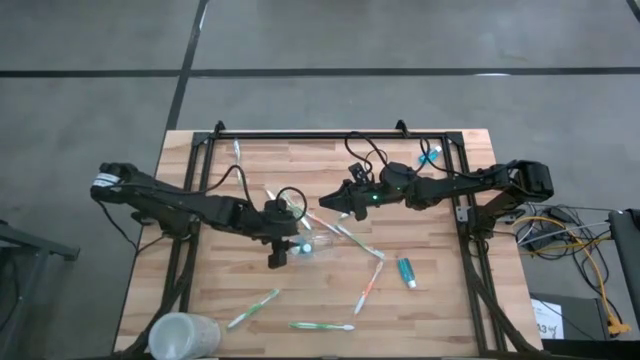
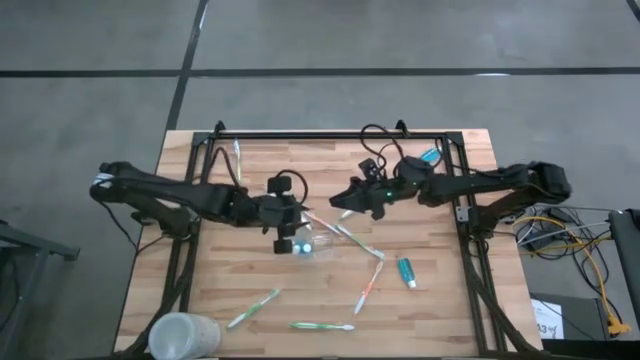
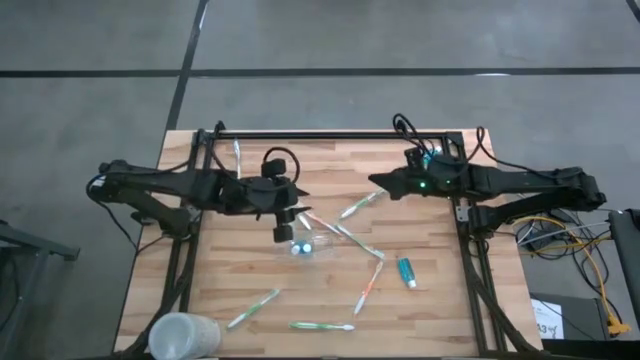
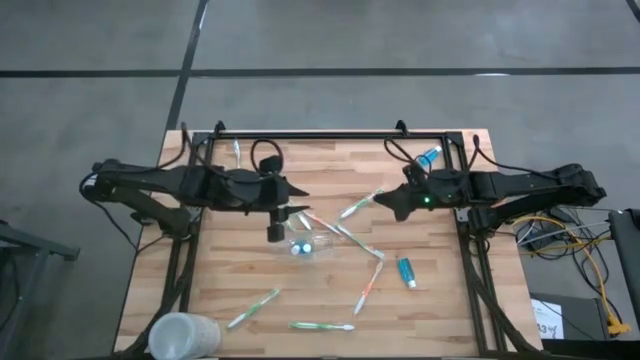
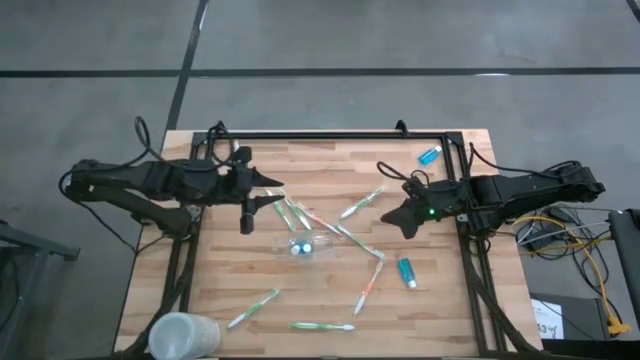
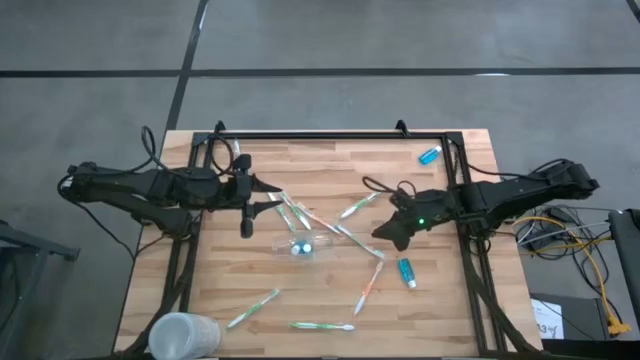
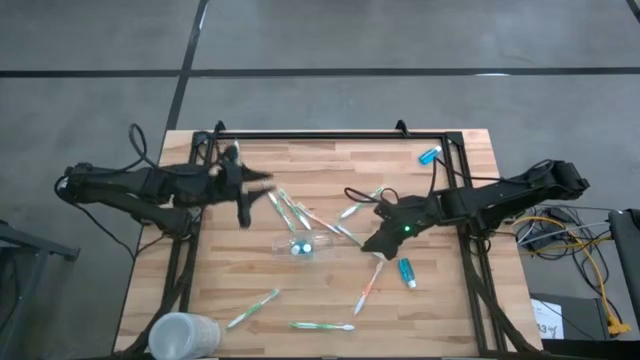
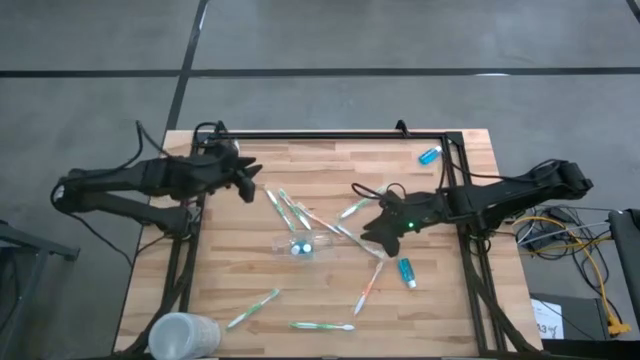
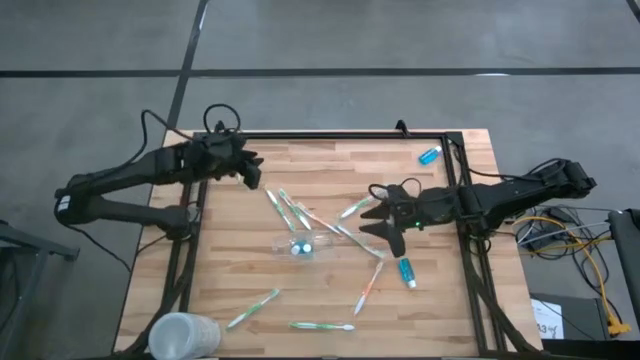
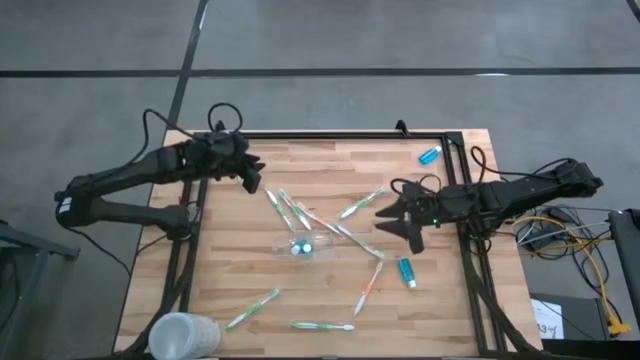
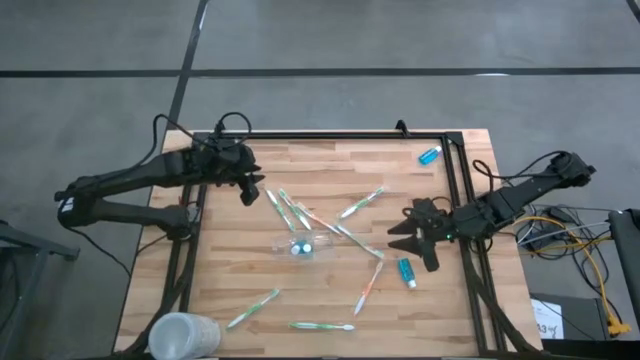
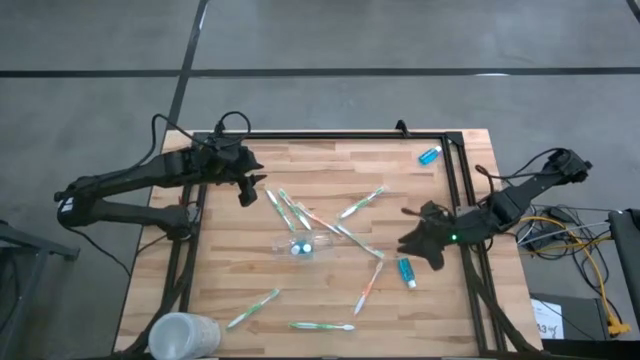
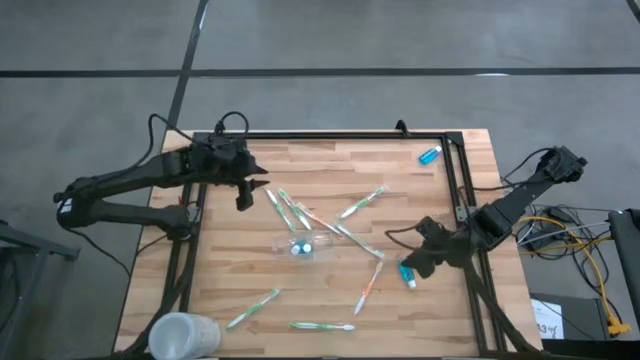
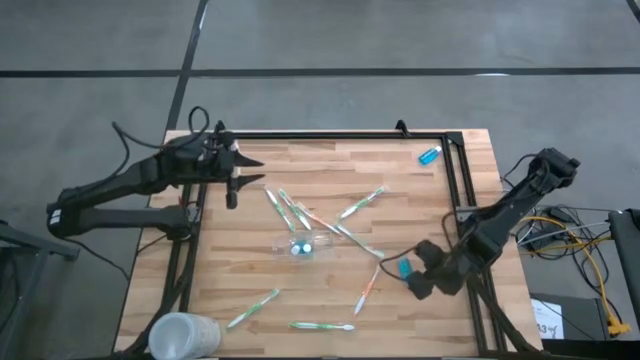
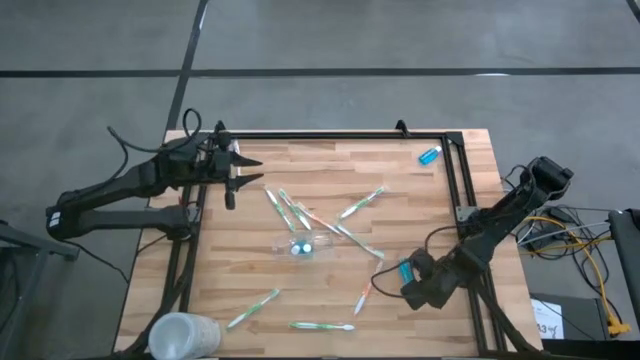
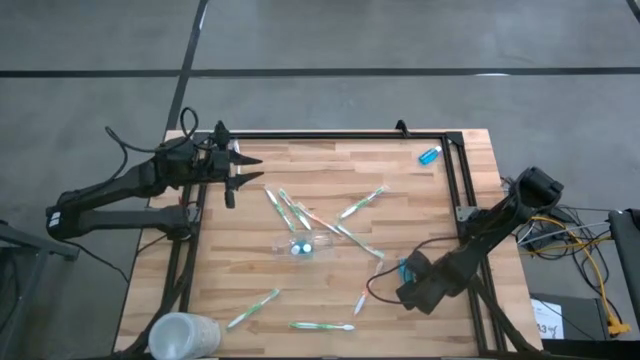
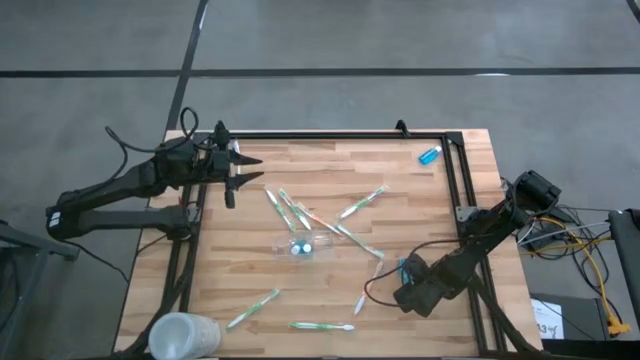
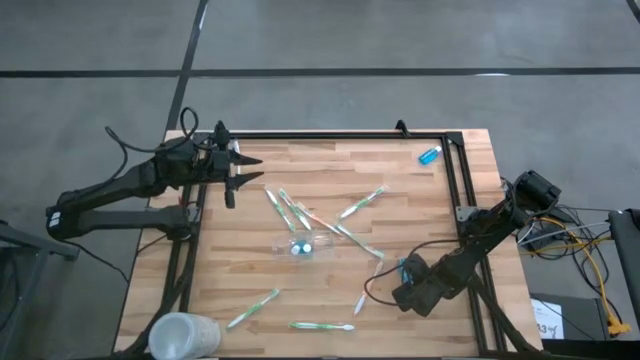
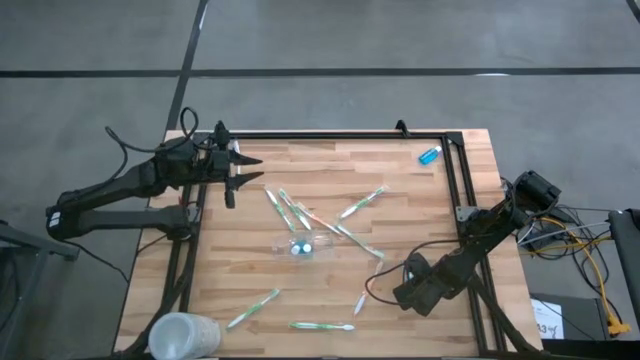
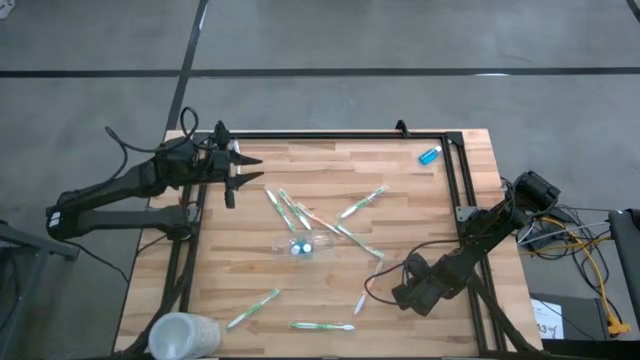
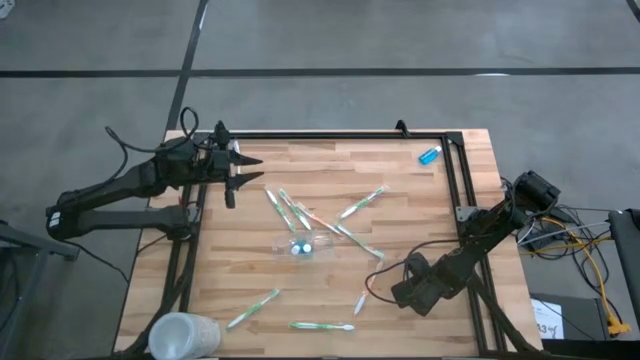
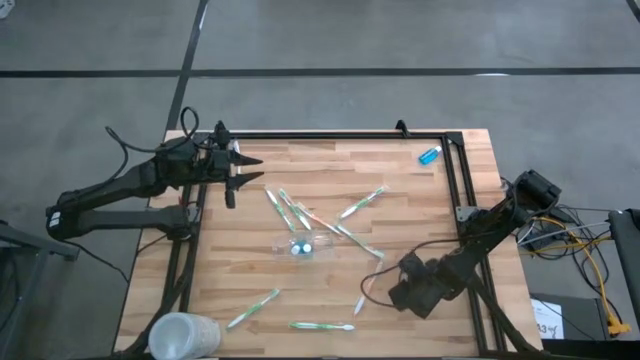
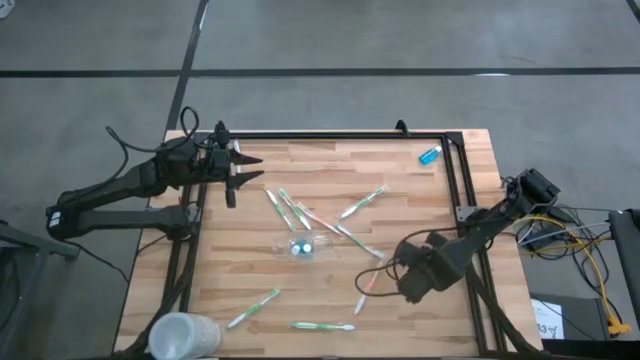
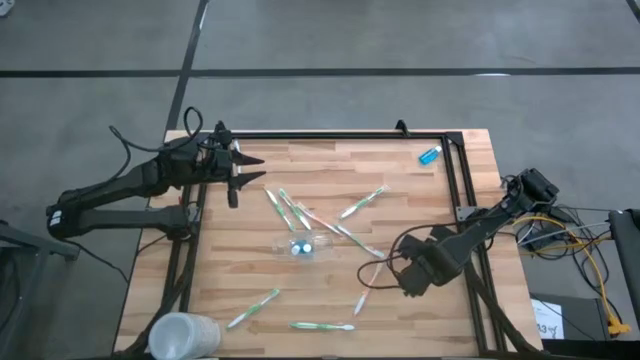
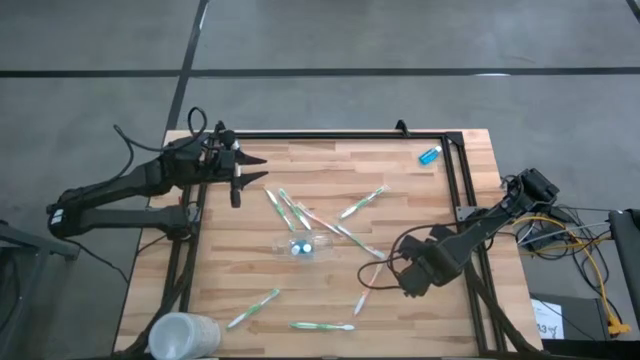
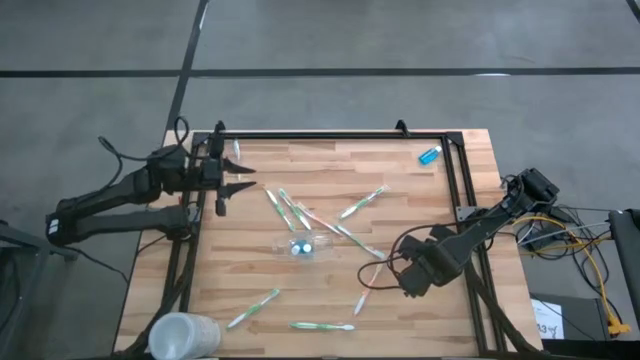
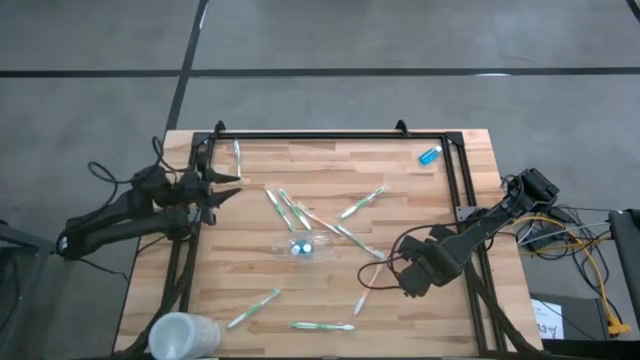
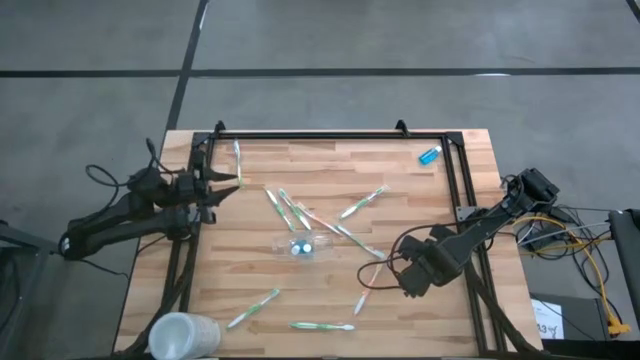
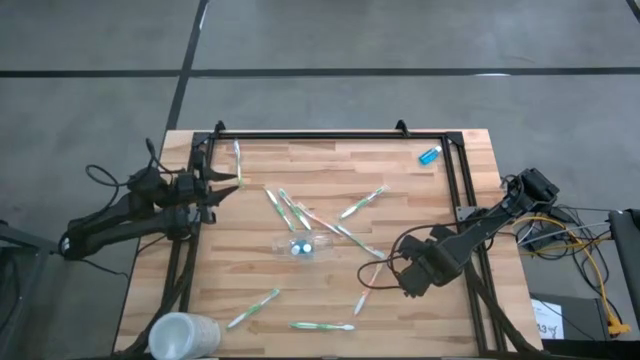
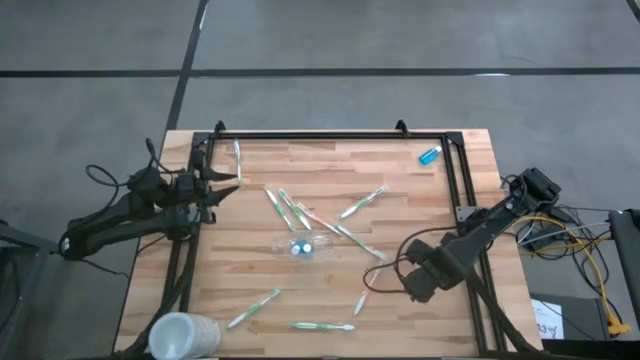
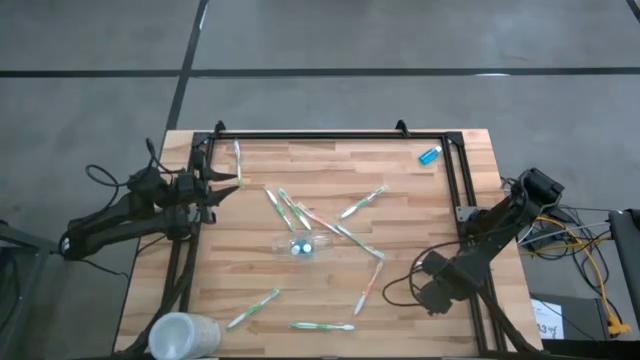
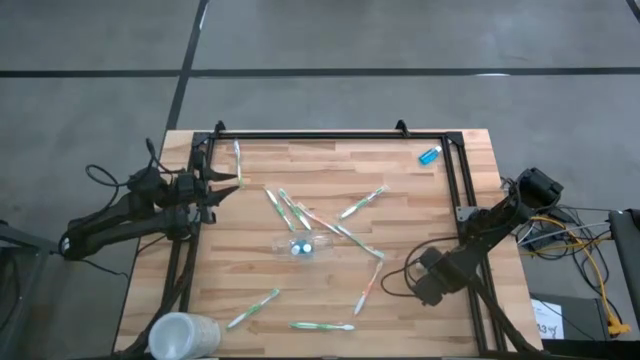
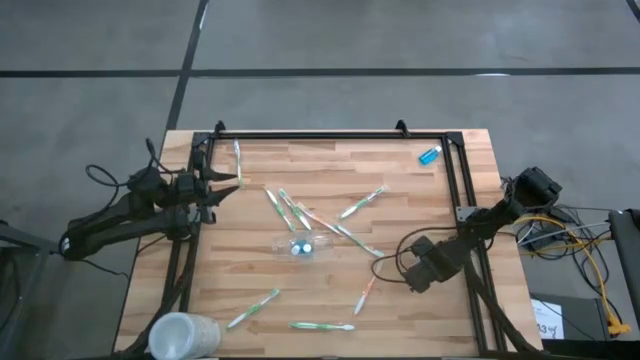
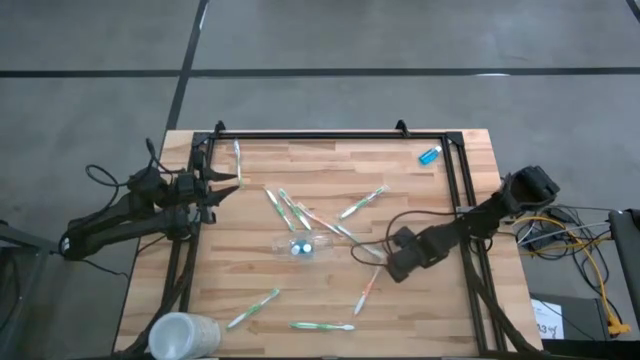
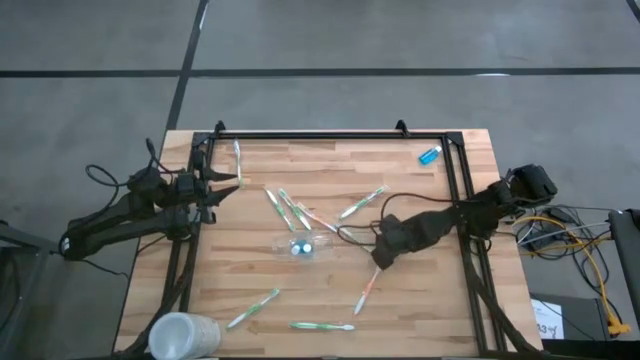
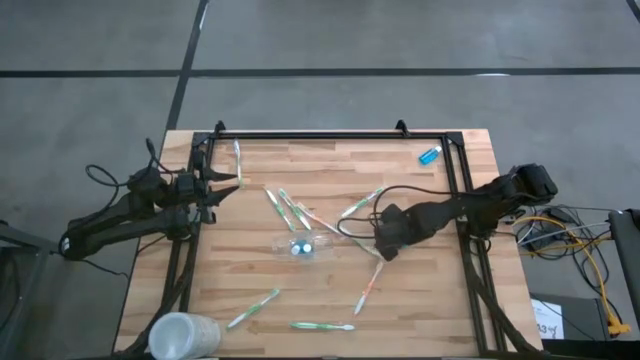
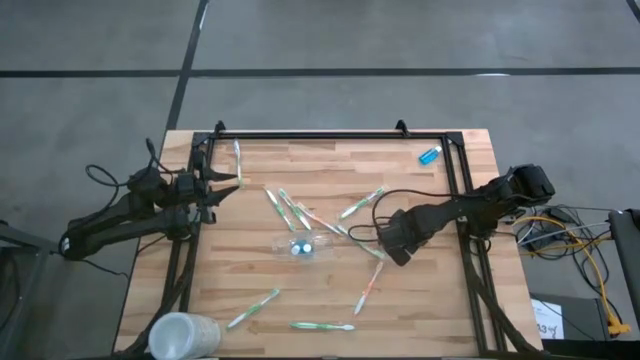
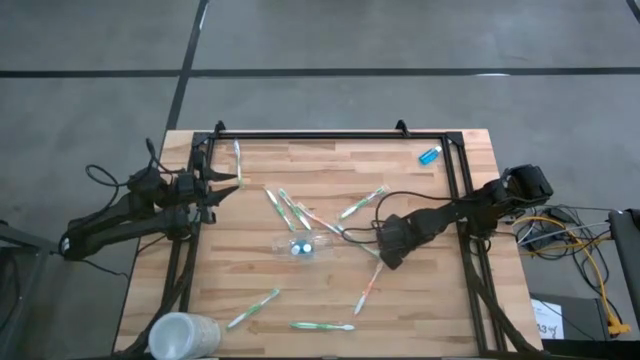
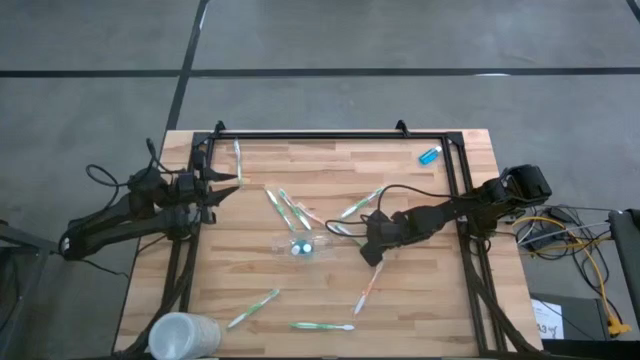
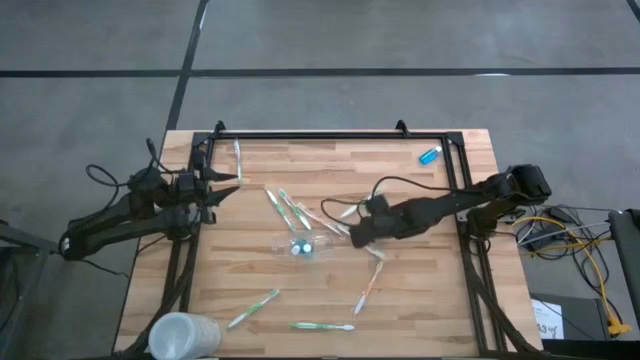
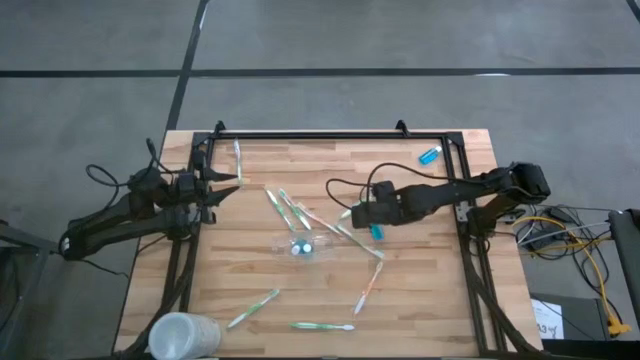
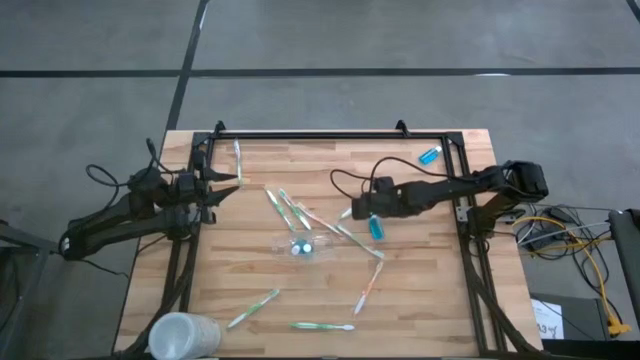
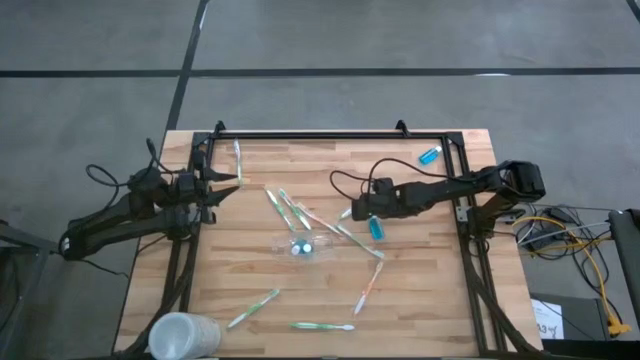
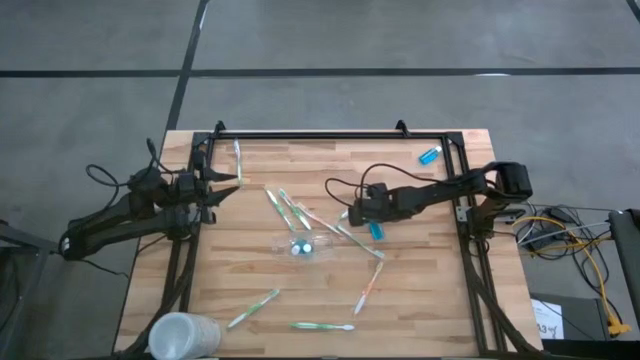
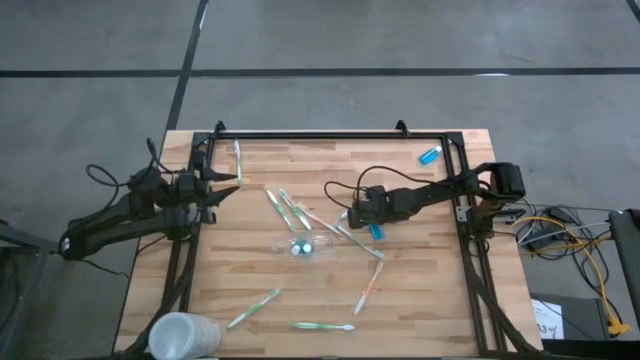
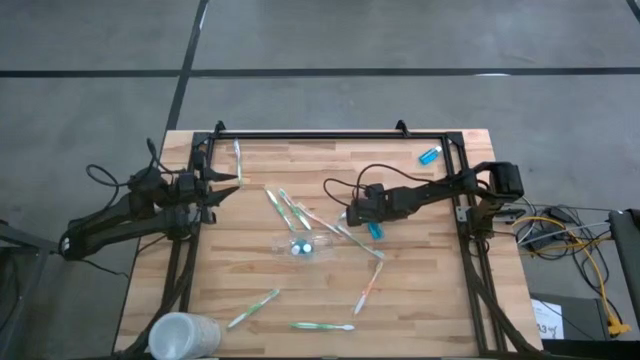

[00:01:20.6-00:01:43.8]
Task: Pick & Place toothbrushing station
Put the blue mouthwash bottle into the transparent organizer
